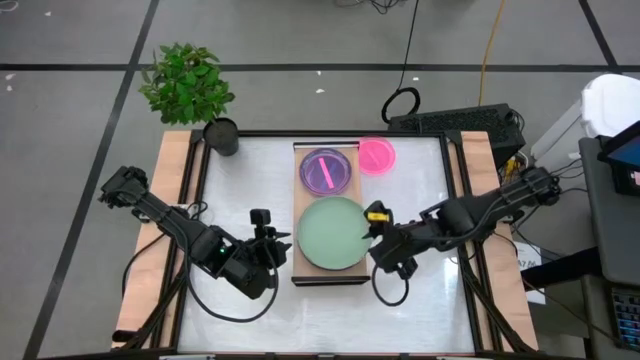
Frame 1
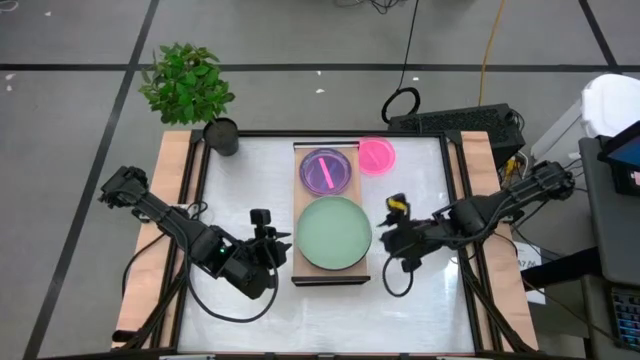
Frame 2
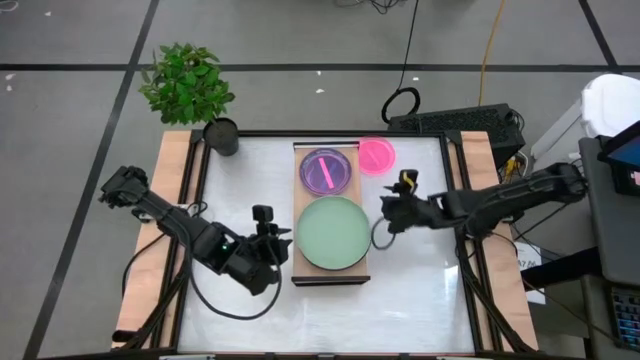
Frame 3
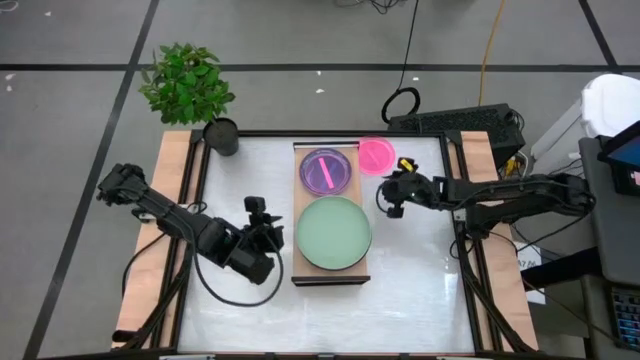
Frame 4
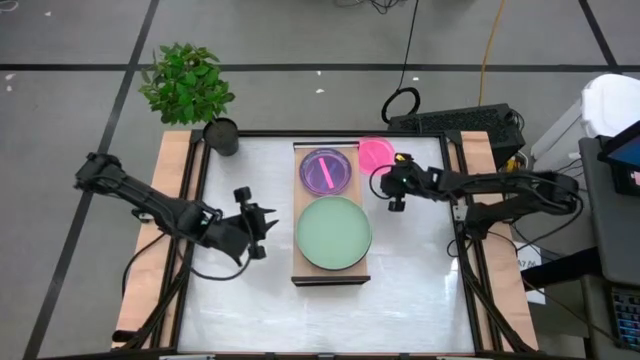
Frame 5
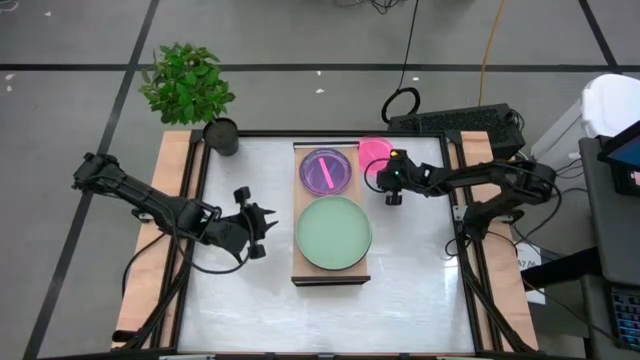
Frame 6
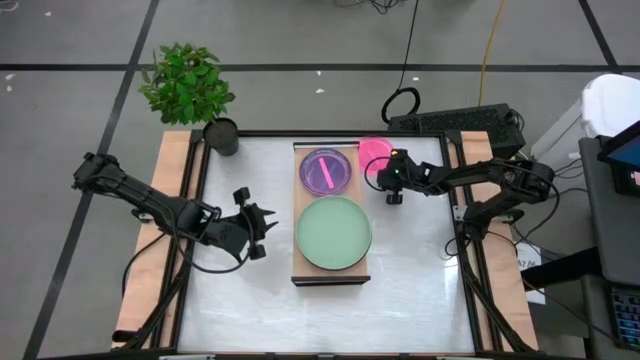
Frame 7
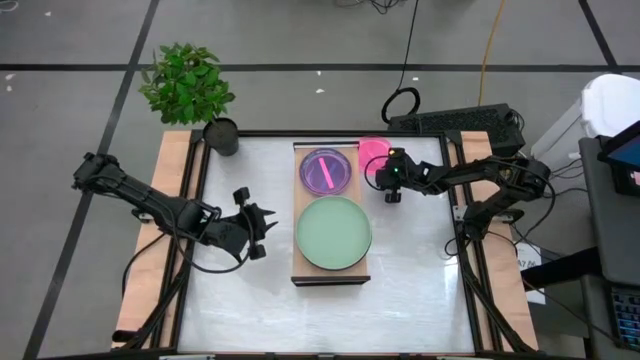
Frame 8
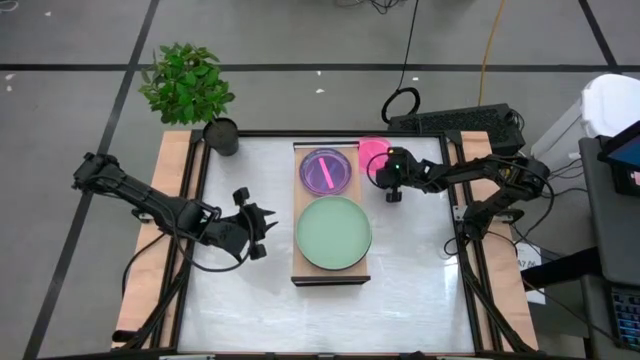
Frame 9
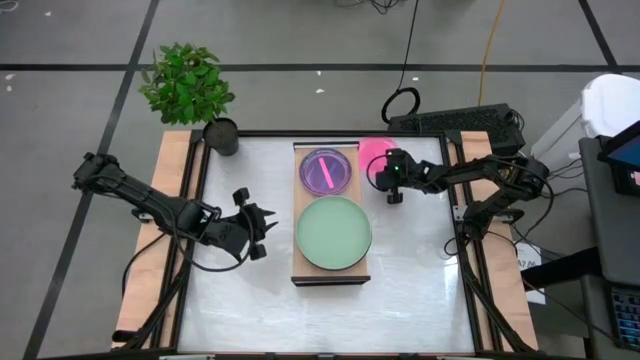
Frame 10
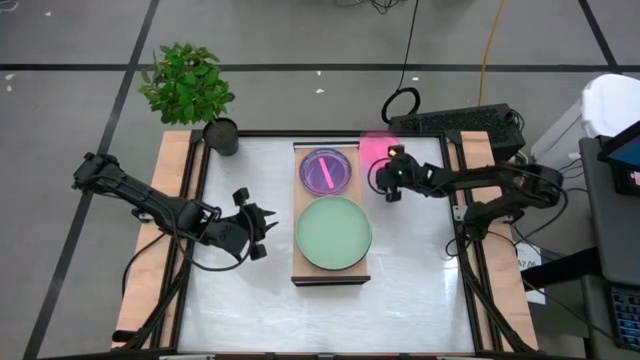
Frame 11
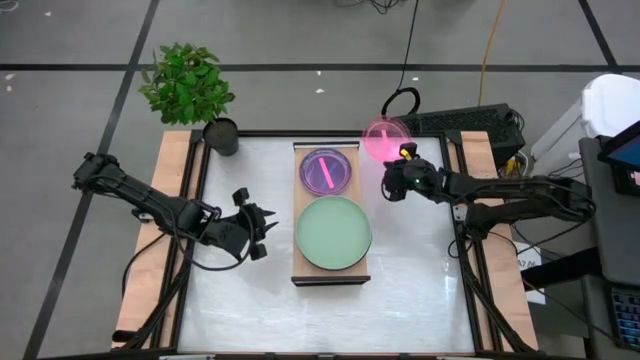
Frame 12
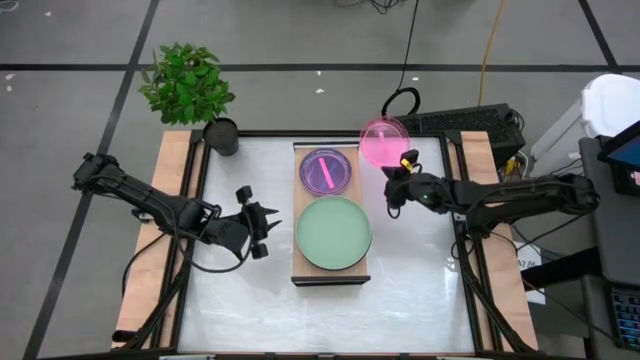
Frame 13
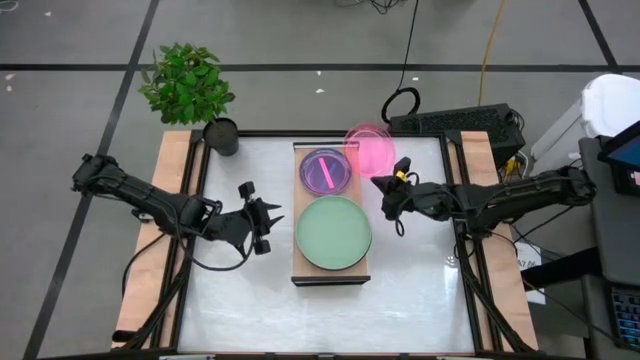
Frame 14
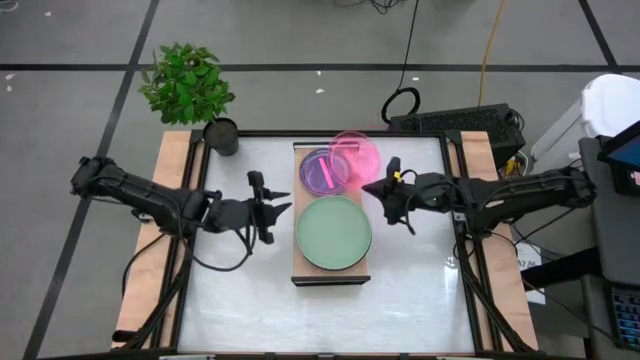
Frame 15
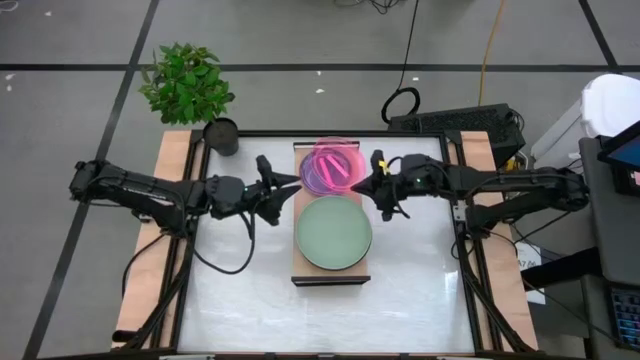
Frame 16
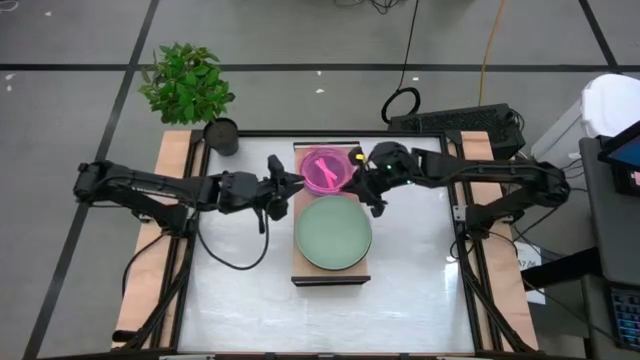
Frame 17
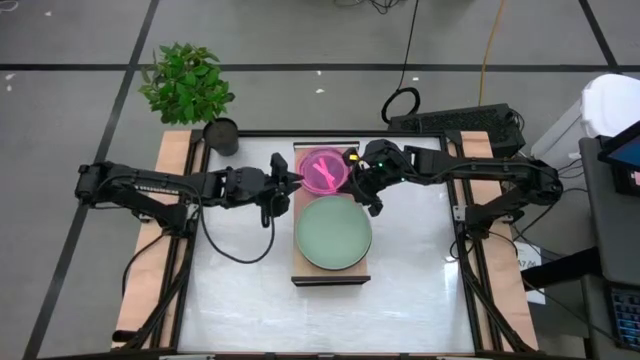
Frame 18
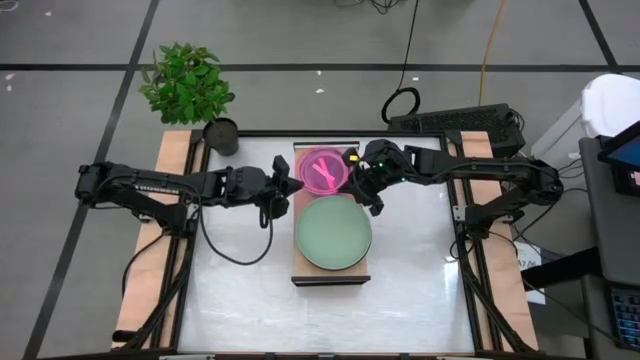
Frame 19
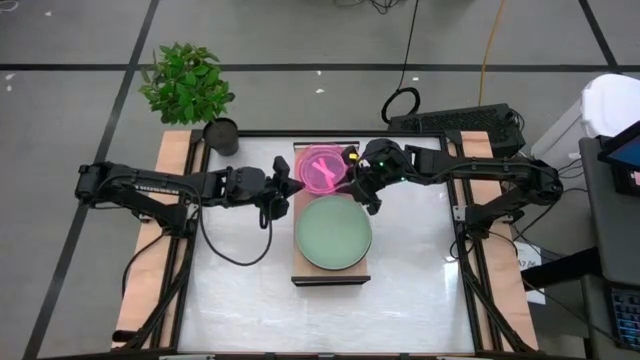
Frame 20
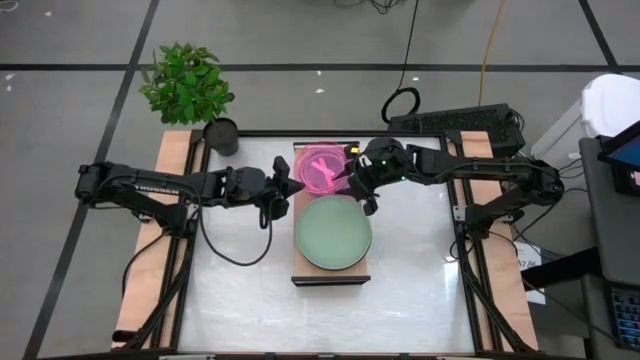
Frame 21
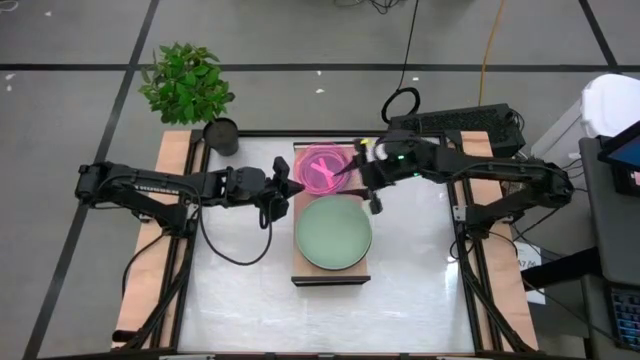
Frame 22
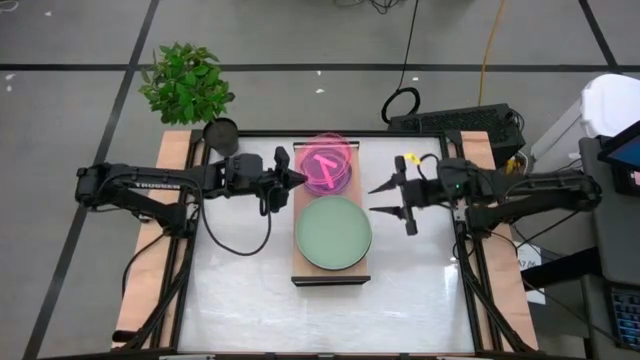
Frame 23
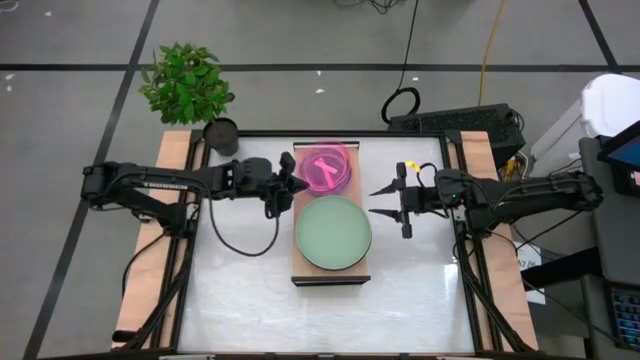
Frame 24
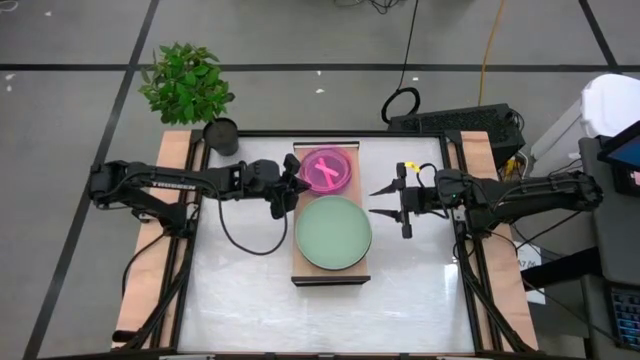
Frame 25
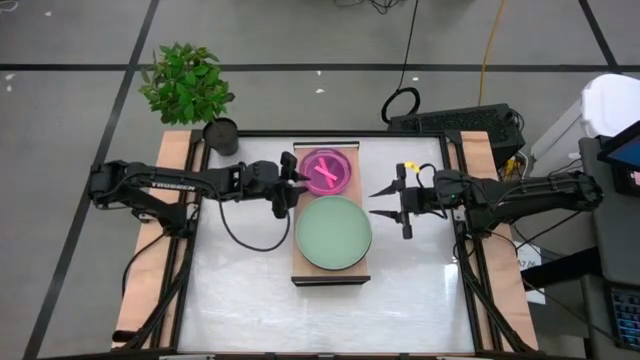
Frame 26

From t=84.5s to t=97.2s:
Task: Place and stack plates onto a shelf
Stack the pink plate on top of the pink plate

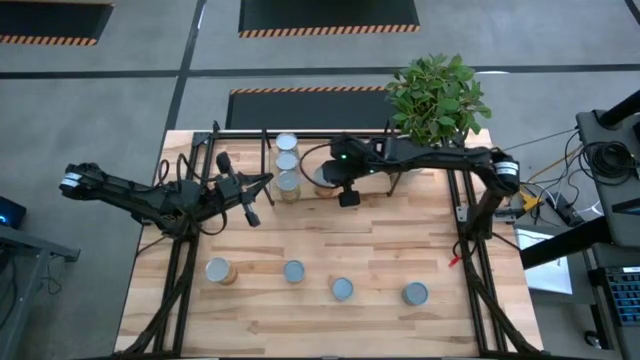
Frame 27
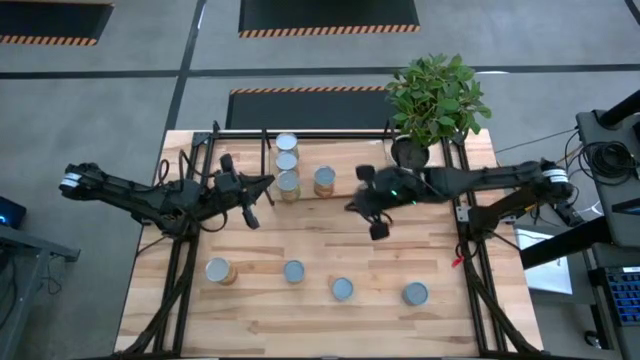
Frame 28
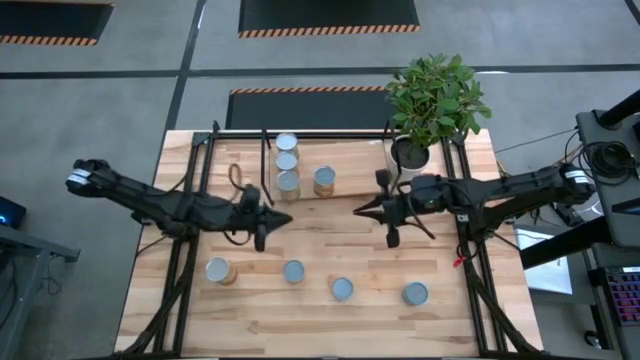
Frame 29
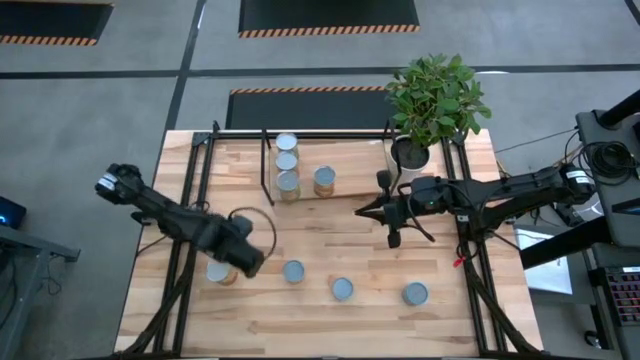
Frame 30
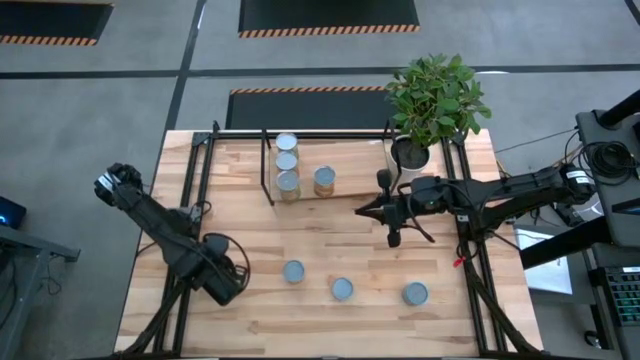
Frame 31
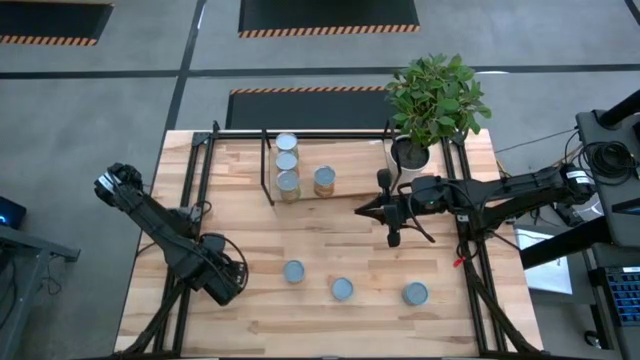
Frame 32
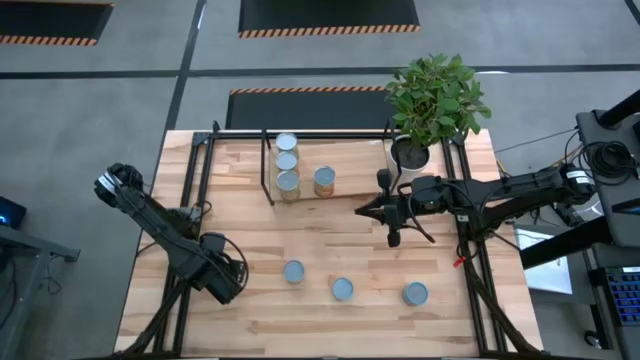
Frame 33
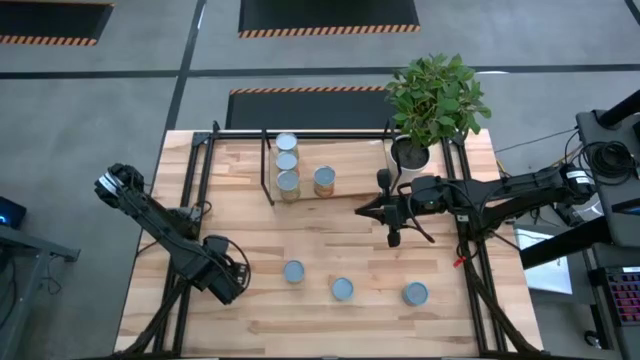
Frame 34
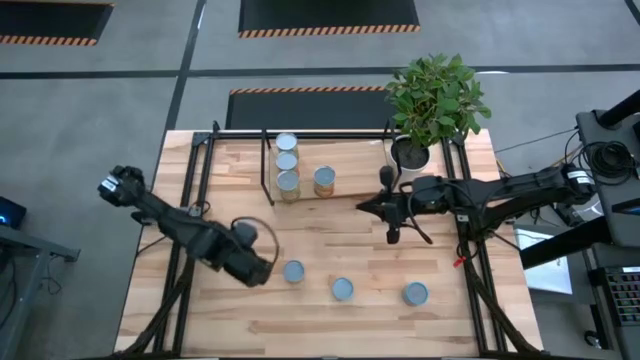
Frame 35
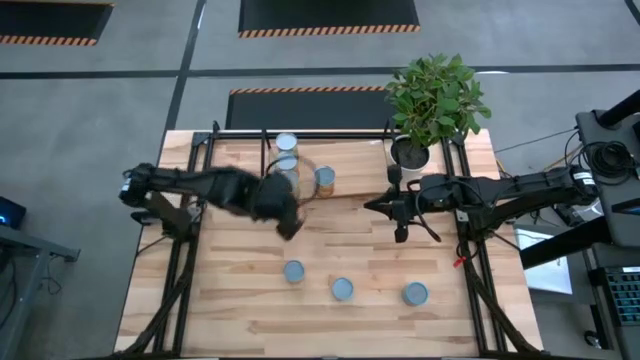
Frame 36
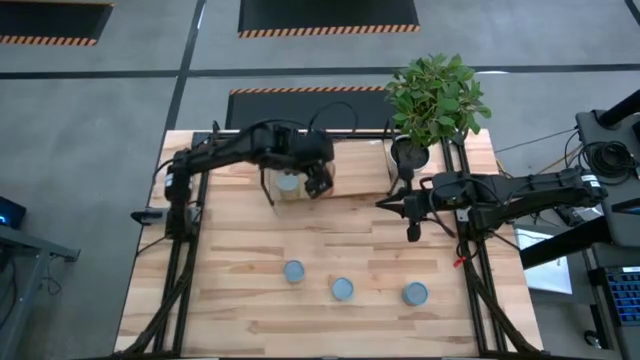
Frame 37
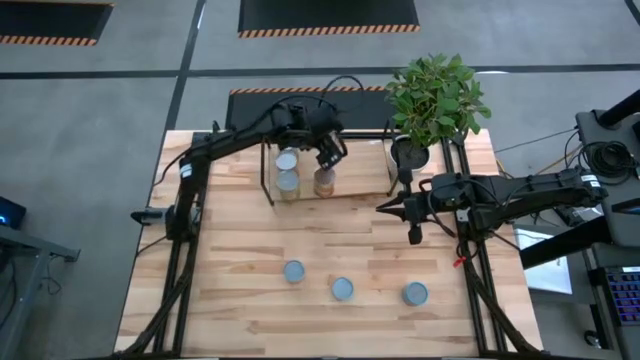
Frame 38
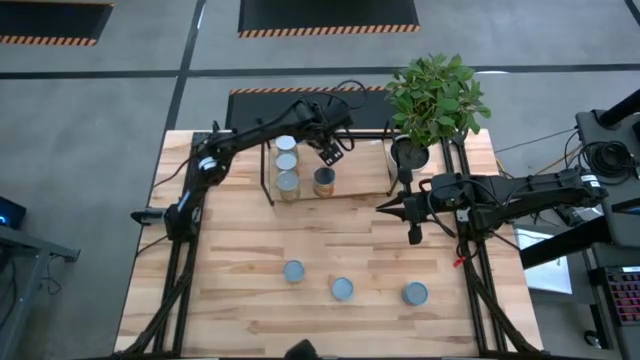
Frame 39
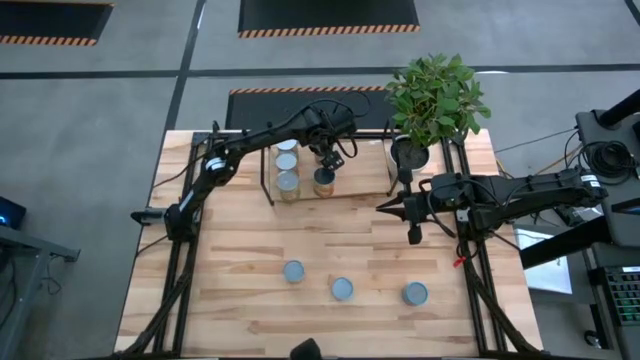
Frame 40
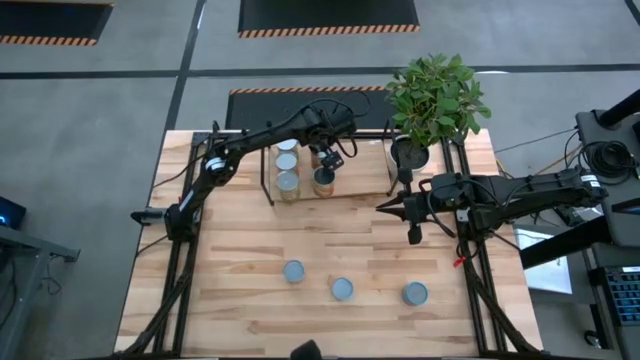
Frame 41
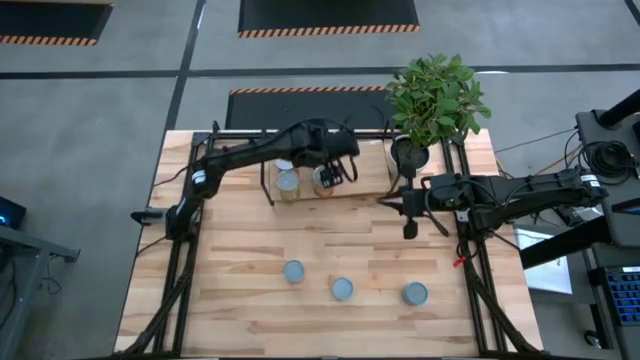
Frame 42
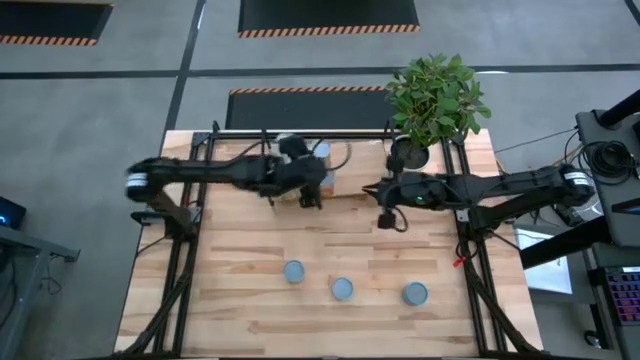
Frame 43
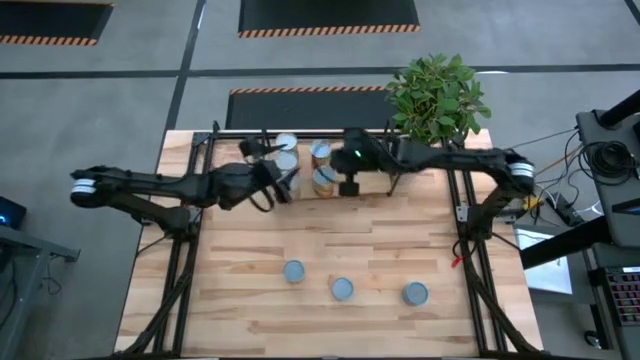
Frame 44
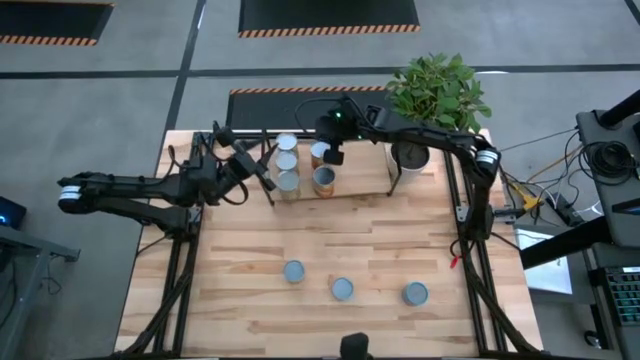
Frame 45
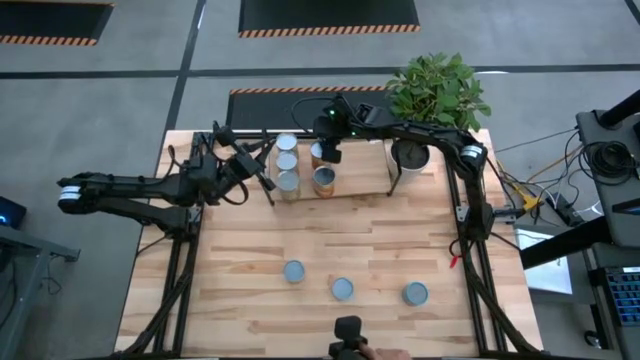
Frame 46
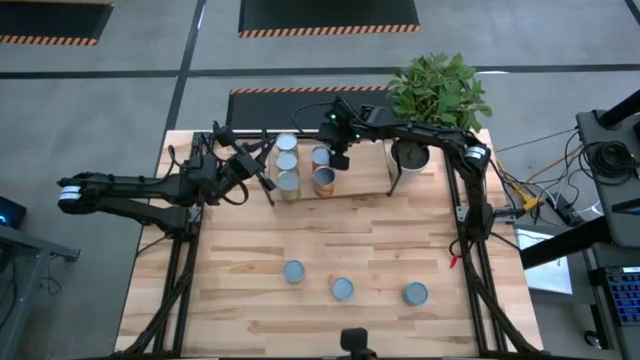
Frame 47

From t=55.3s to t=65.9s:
Task: Pick and place cans onto a shelf
Put the canned corn on the shelf
